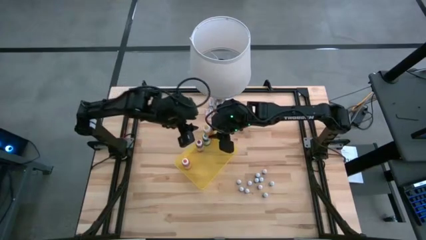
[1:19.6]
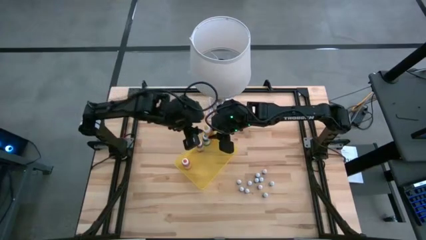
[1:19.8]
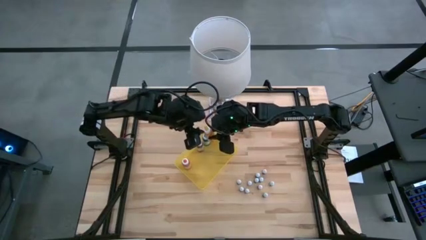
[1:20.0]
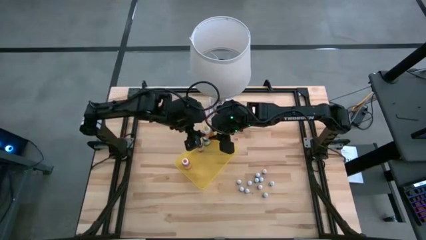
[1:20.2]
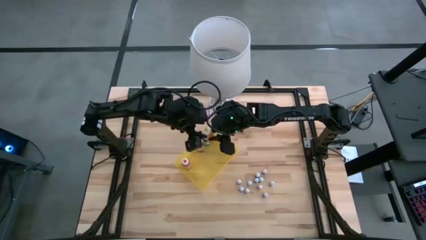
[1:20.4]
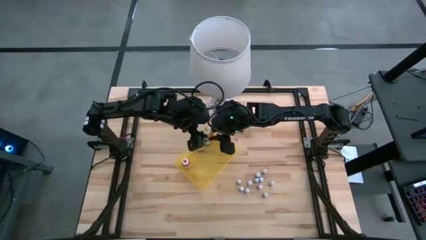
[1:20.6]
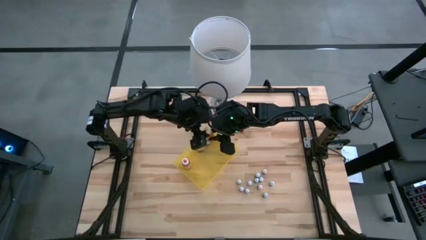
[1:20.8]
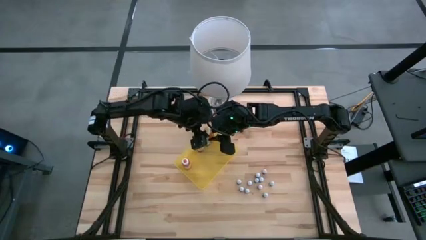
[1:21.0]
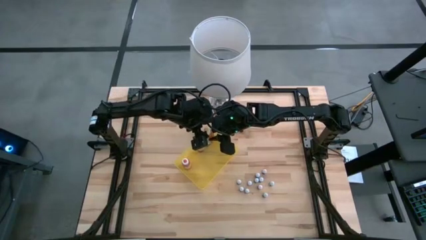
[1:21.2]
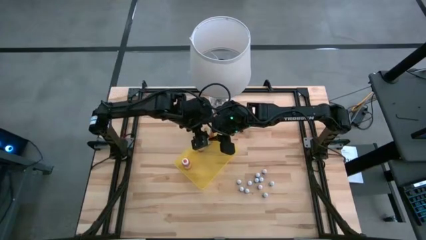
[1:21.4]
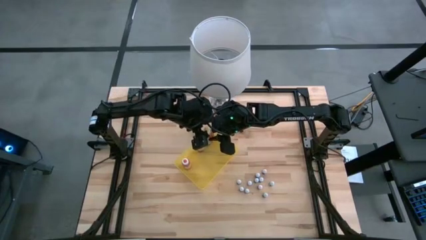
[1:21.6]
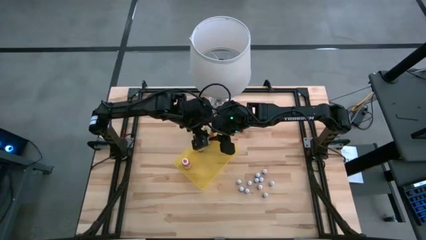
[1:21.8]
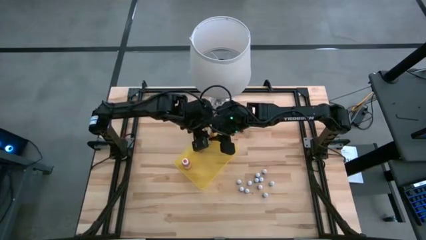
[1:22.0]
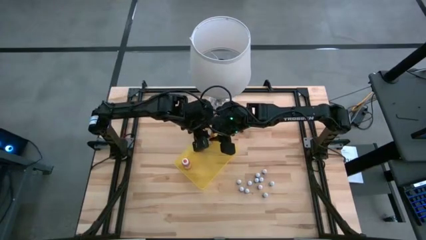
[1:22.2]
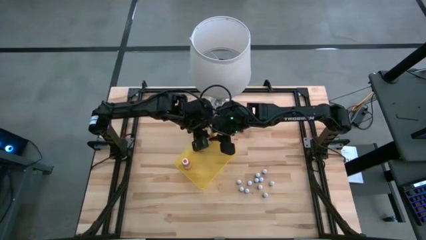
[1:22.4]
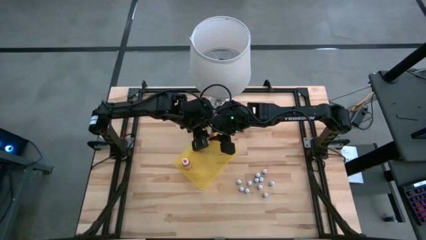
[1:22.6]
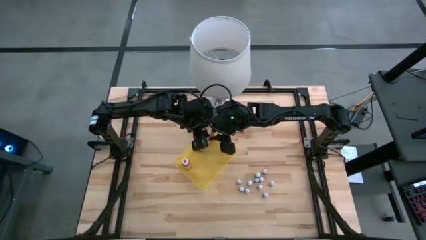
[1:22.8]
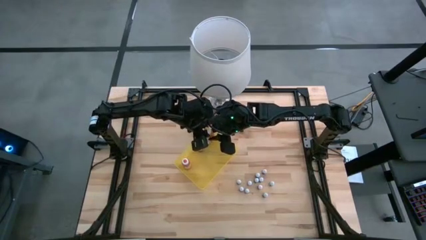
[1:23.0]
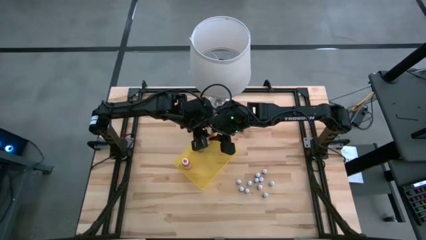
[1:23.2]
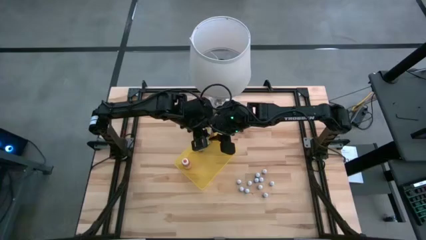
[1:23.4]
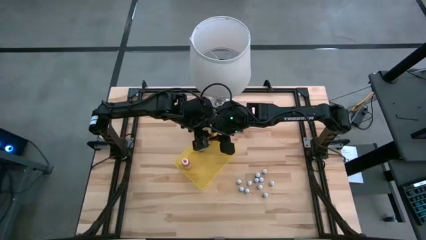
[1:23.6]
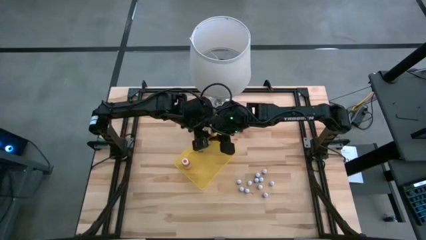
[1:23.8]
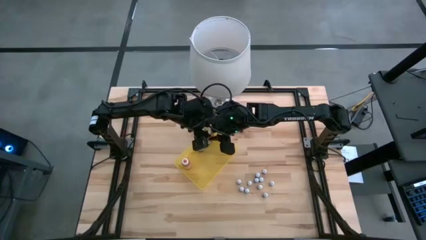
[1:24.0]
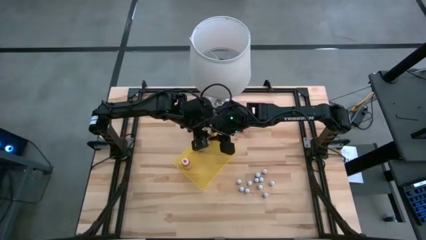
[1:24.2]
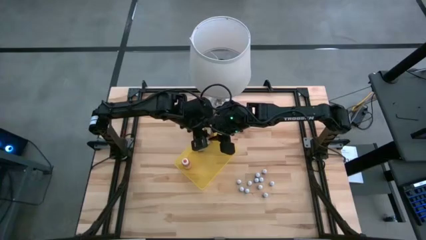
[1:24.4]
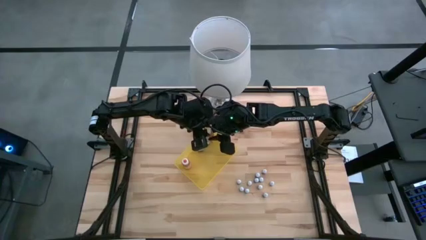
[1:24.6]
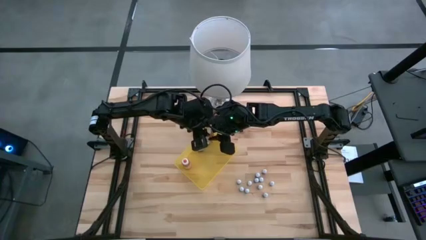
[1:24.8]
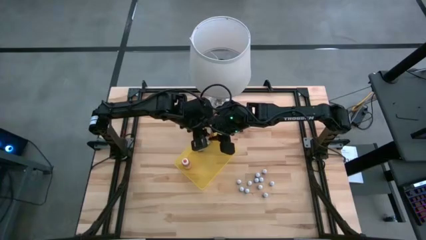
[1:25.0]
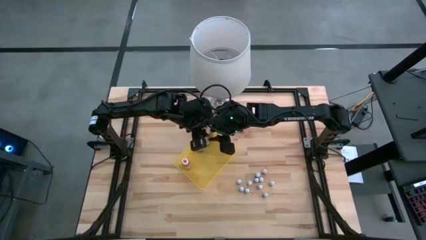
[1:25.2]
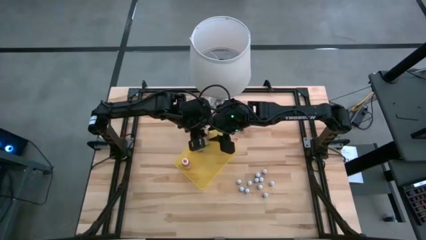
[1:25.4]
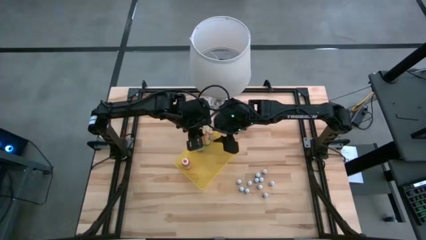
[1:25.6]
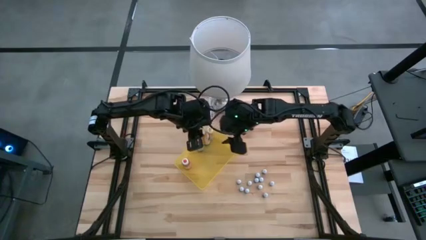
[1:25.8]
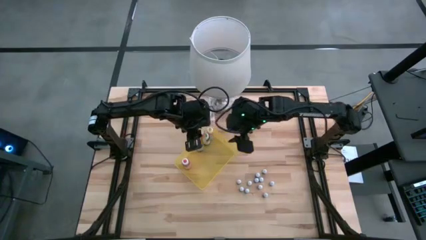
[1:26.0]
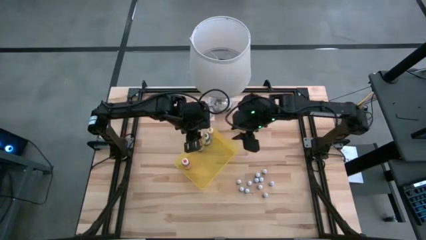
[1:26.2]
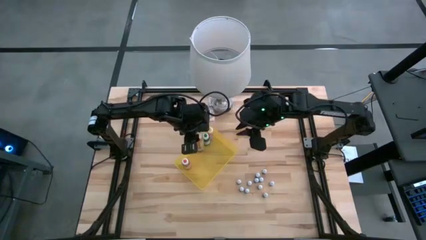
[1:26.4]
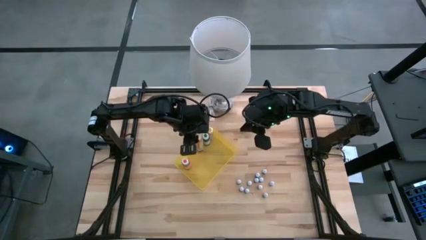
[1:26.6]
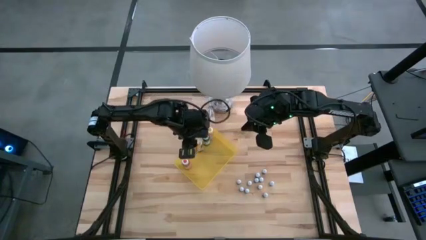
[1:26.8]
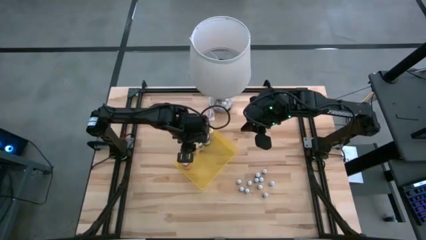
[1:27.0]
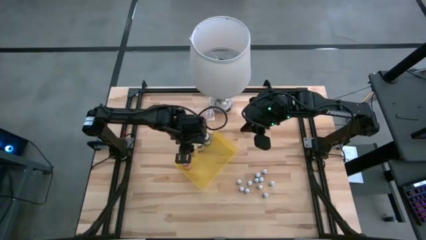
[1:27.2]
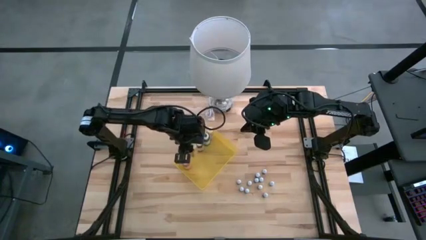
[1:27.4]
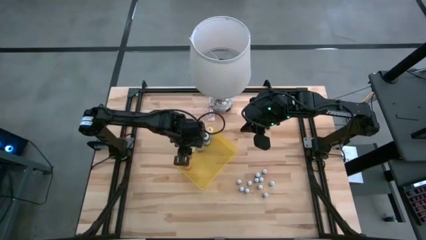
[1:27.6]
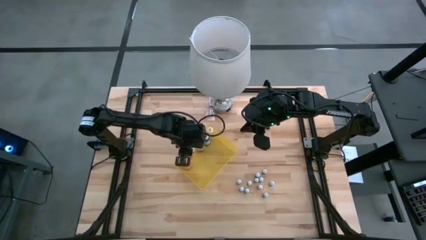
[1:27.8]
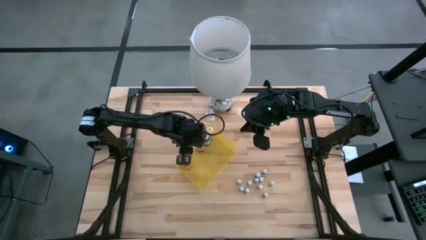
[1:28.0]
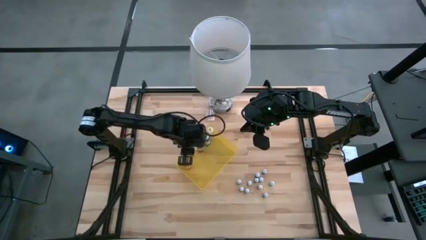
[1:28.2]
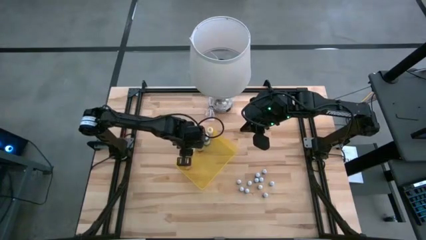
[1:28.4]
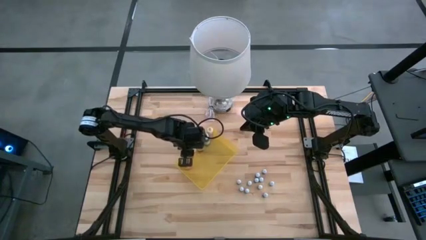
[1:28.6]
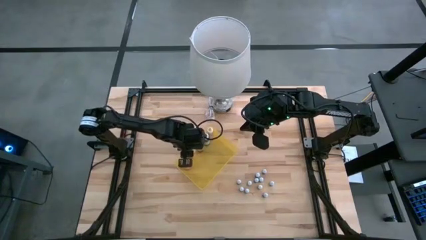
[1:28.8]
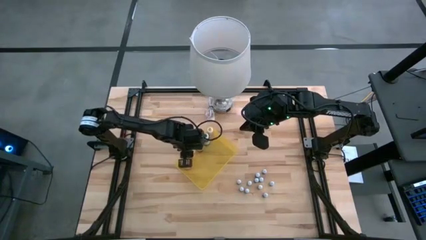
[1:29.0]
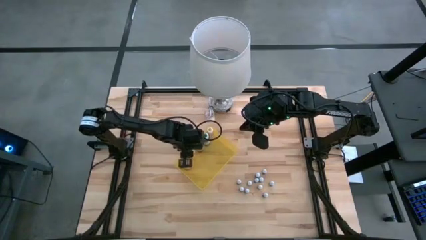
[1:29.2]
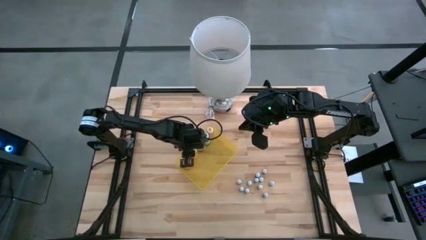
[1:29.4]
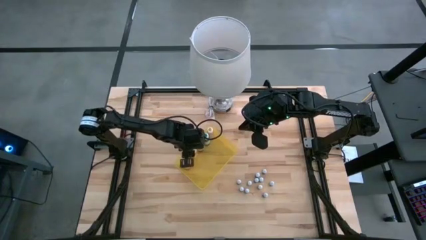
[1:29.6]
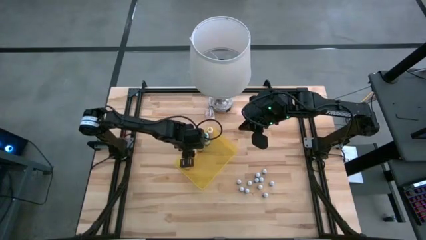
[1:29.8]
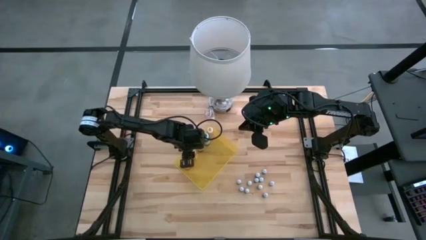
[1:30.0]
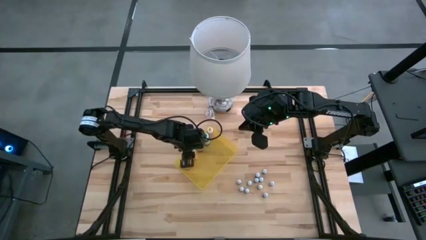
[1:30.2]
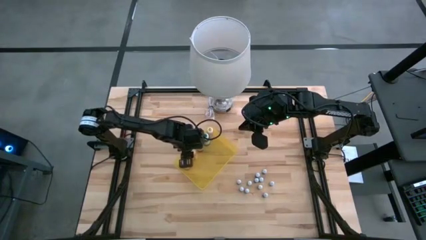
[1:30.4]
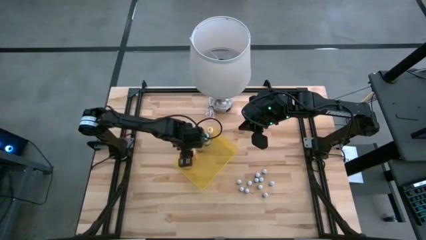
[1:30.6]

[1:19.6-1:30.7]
Task: Pick & Place food coloring
Put the large yellow food coloring bottle into the yellow bin

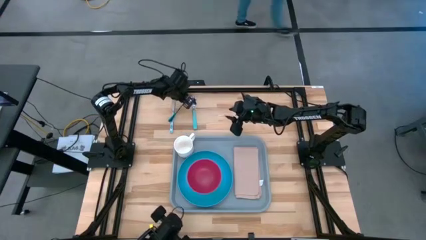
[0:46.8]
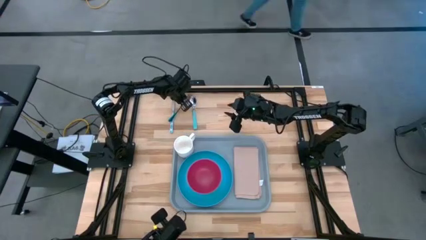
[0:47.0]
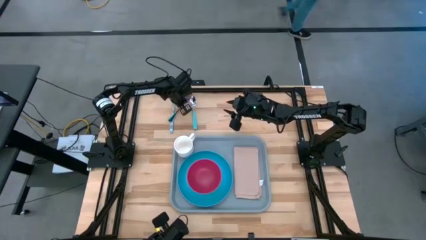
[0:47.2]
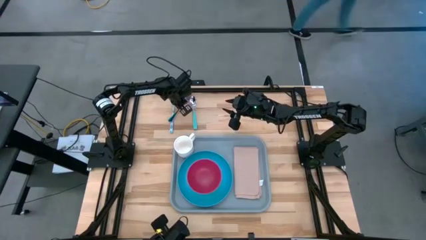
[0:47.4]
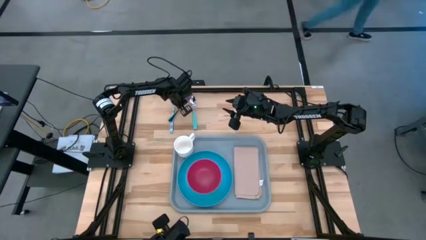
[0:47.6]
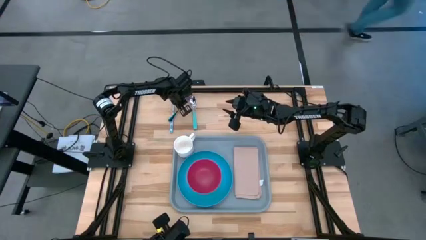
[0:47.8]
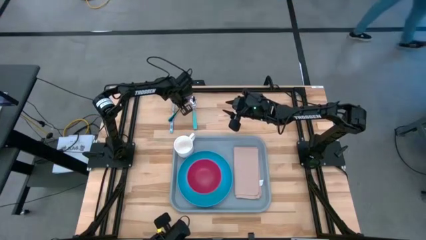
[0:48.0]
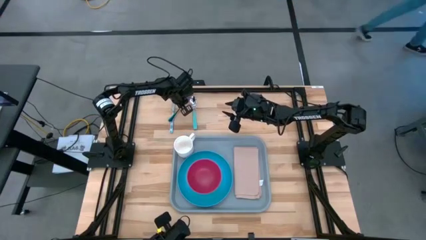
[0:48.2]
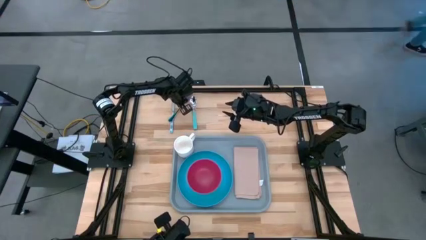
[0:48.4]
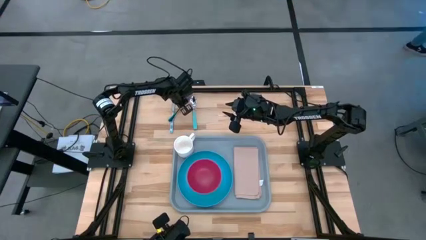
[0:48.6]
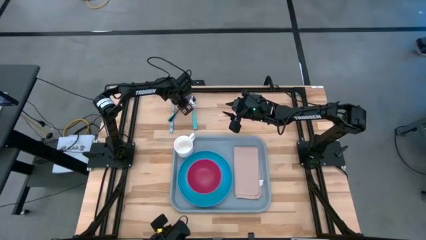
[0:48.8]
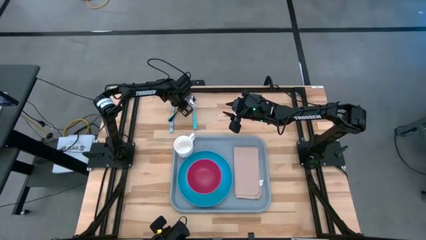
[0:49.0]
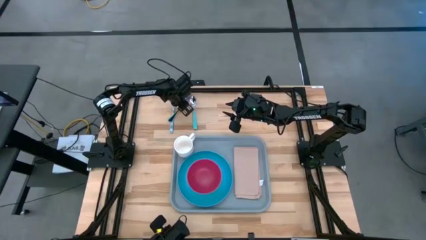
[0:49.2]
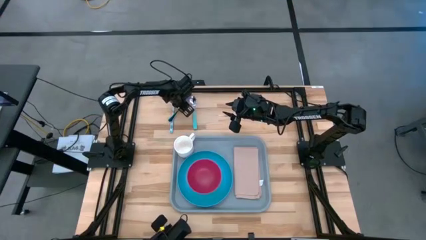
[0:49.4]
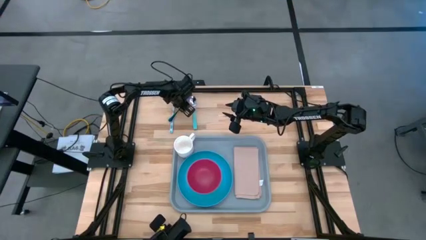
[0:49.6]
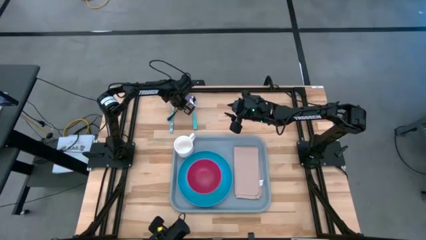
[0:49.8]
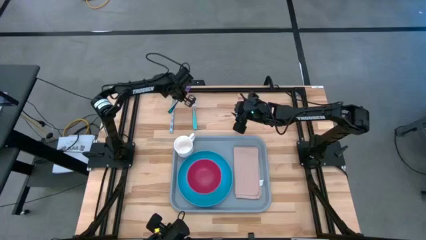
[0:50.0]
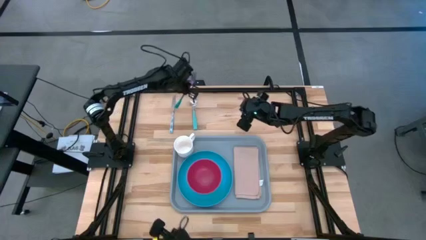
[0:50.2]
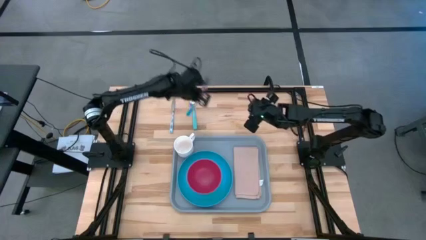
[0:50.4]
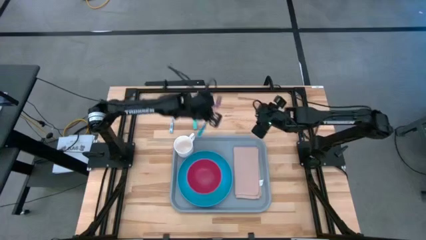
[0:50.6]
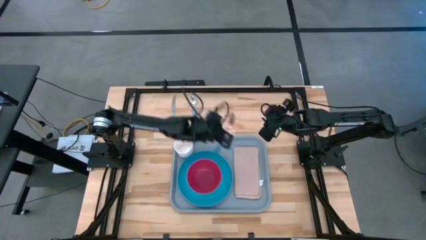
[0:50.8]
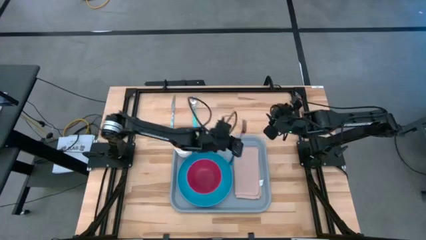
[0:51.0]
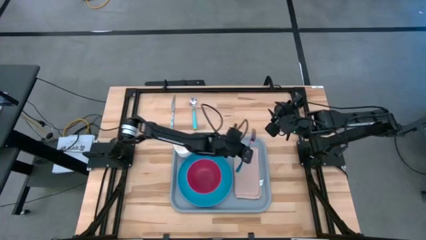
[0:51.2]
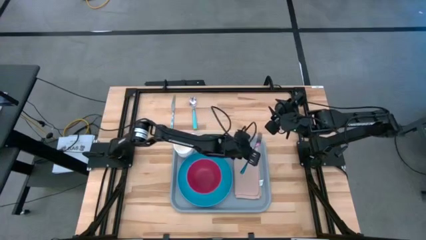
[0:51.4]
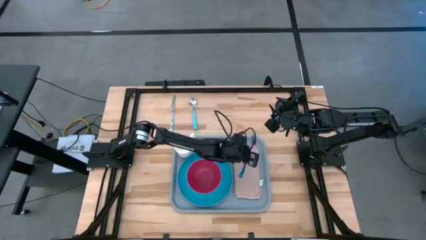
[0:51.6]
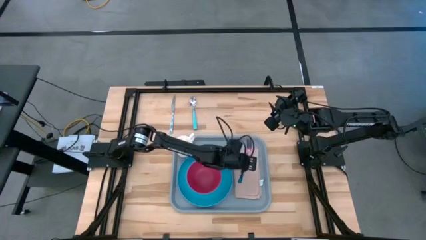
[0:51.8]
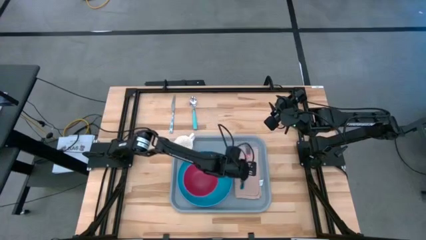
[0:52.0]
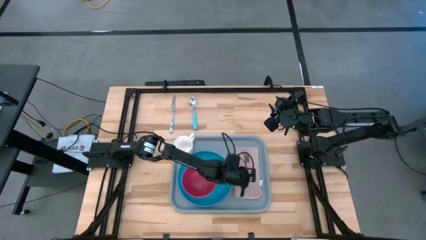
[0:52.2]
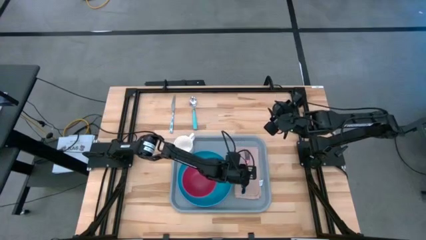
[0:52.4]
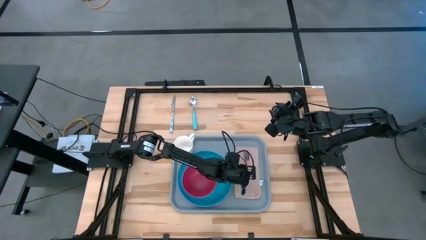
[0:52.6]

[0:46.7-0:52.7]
Task: Set up tray
Put the purple fork on the gray napkin
